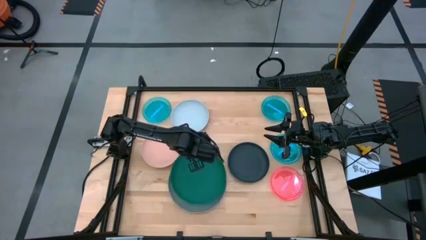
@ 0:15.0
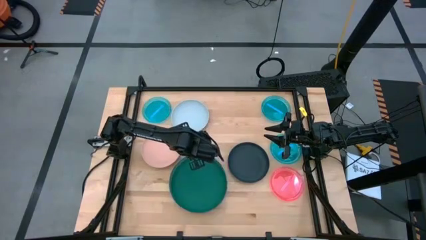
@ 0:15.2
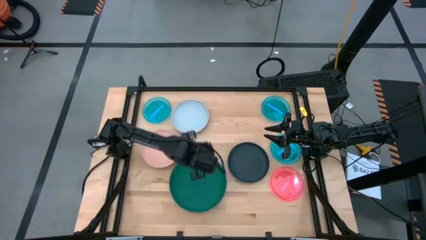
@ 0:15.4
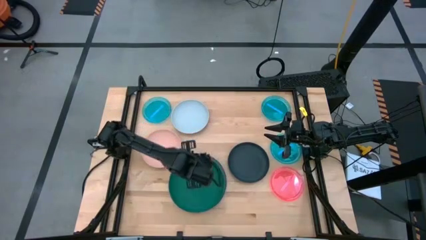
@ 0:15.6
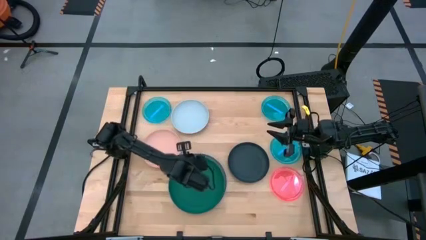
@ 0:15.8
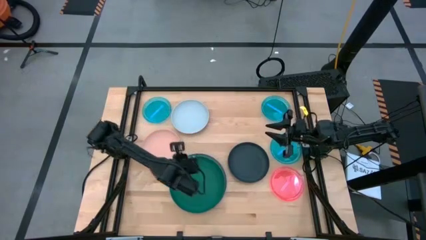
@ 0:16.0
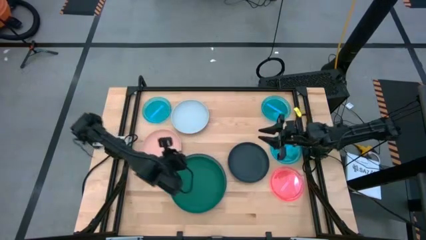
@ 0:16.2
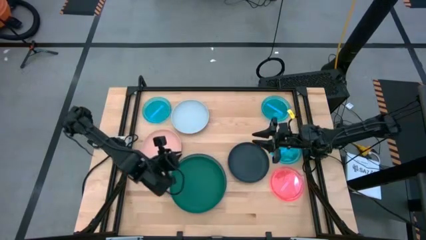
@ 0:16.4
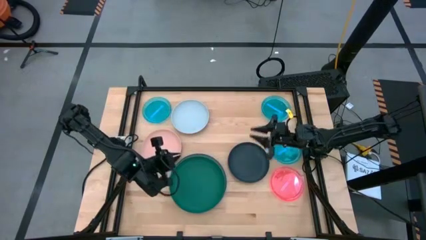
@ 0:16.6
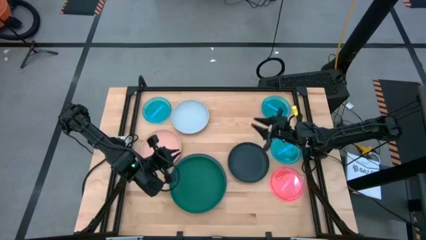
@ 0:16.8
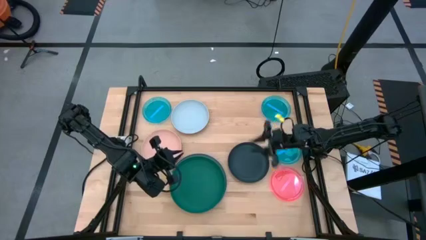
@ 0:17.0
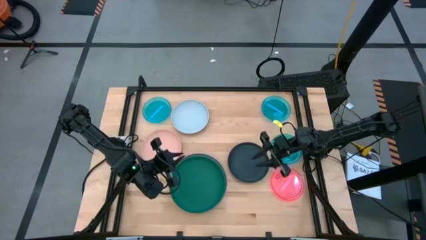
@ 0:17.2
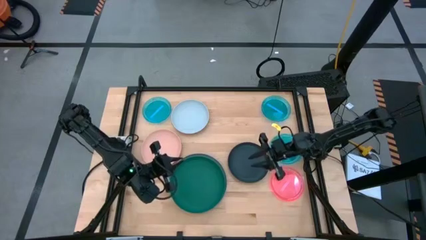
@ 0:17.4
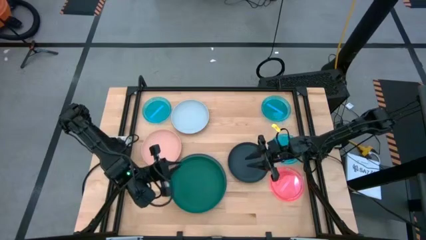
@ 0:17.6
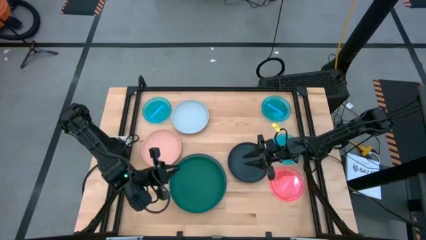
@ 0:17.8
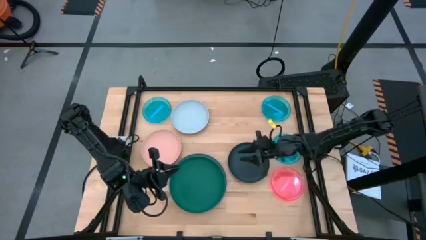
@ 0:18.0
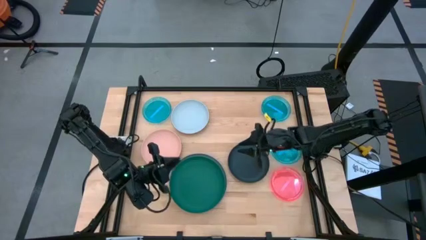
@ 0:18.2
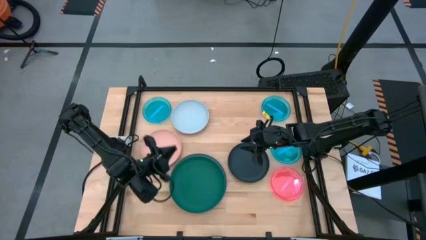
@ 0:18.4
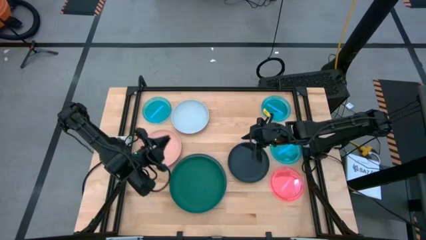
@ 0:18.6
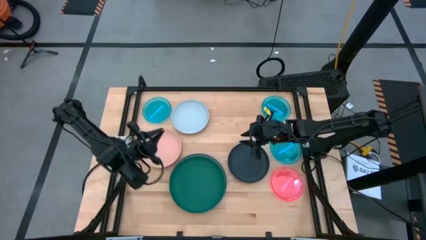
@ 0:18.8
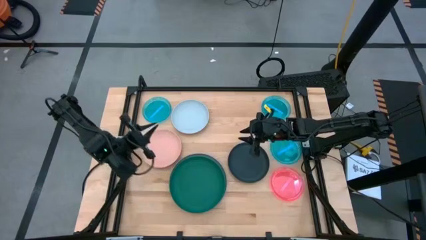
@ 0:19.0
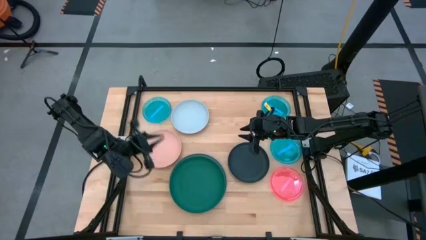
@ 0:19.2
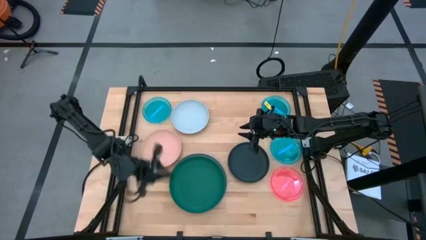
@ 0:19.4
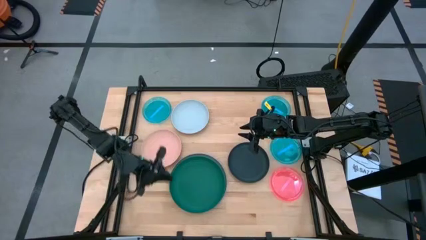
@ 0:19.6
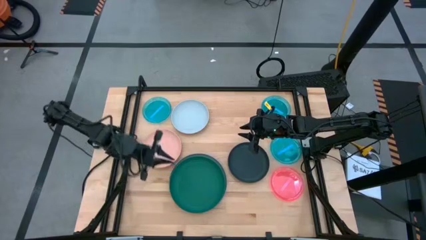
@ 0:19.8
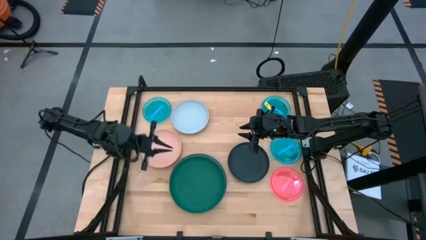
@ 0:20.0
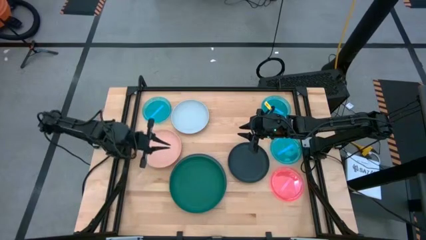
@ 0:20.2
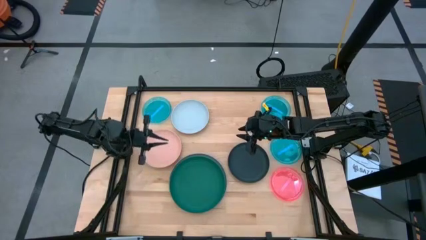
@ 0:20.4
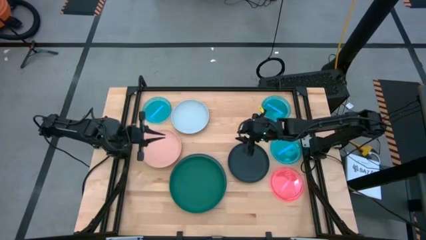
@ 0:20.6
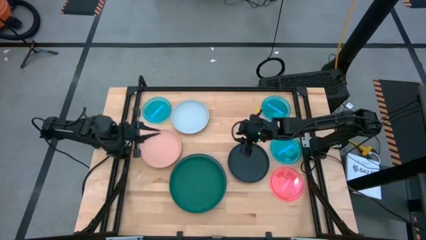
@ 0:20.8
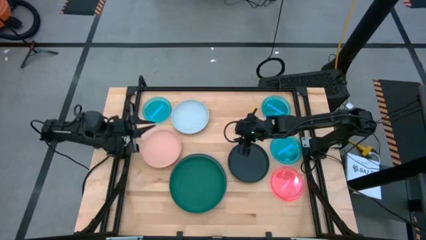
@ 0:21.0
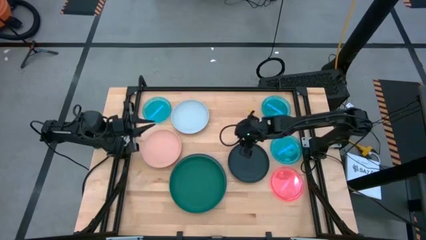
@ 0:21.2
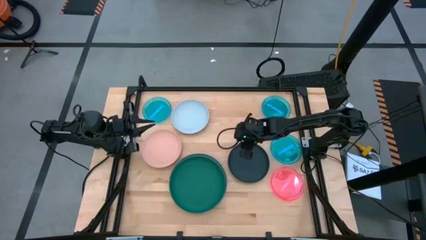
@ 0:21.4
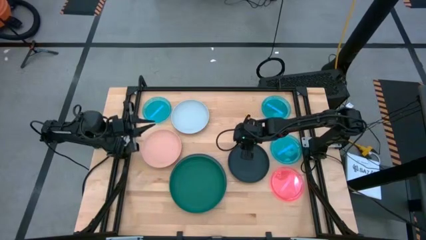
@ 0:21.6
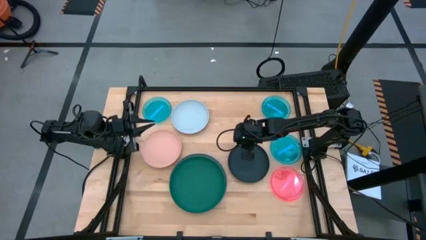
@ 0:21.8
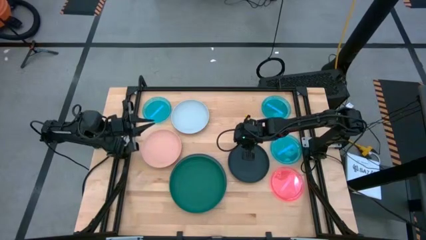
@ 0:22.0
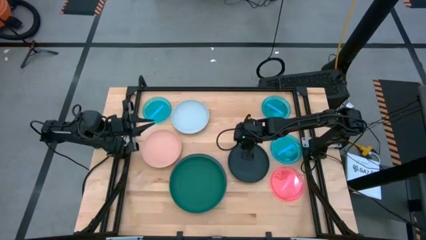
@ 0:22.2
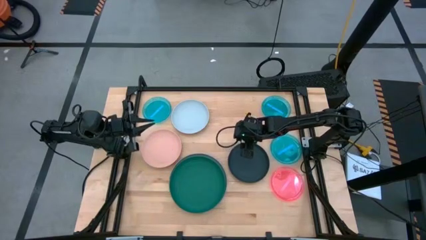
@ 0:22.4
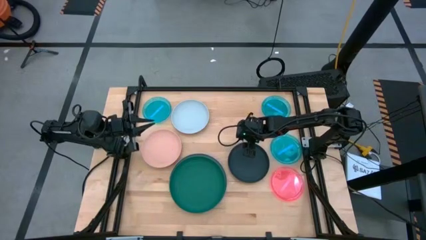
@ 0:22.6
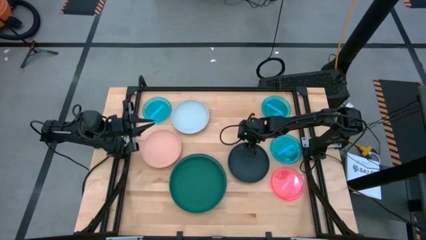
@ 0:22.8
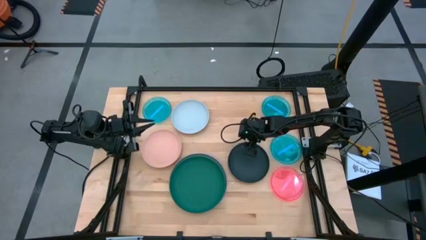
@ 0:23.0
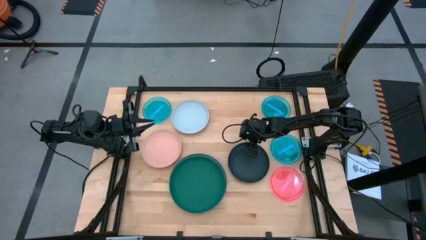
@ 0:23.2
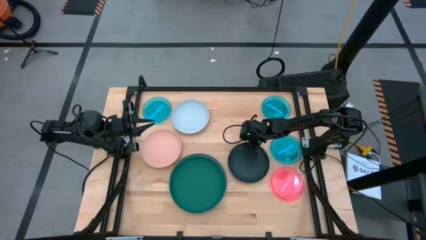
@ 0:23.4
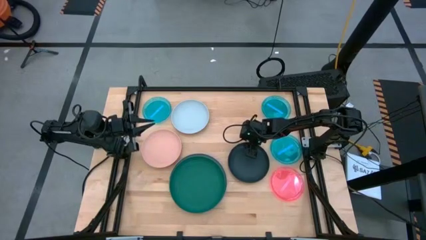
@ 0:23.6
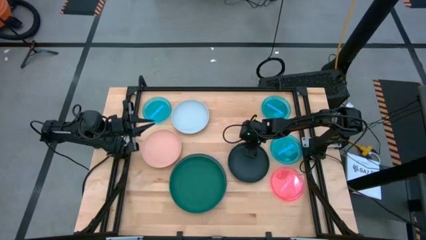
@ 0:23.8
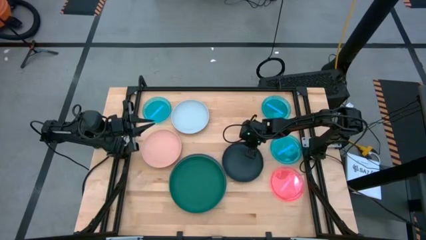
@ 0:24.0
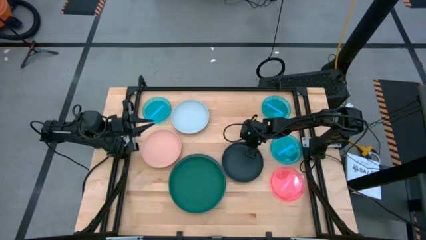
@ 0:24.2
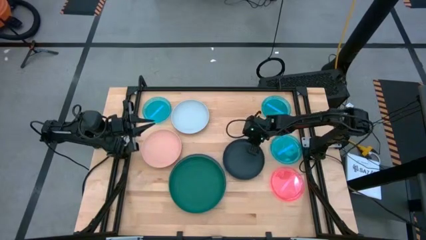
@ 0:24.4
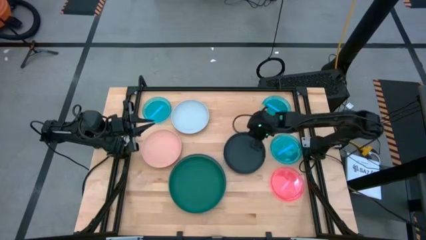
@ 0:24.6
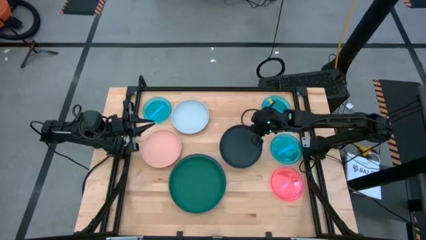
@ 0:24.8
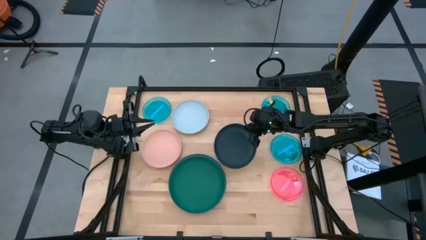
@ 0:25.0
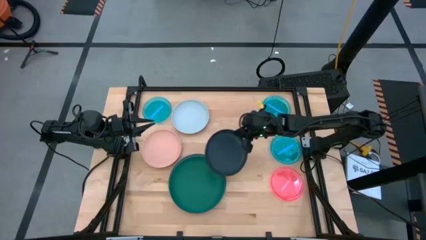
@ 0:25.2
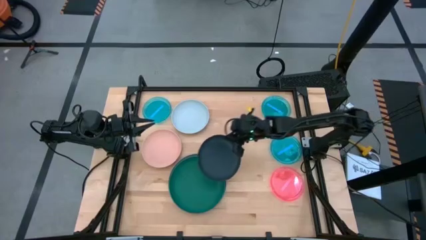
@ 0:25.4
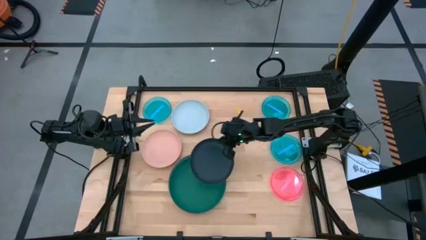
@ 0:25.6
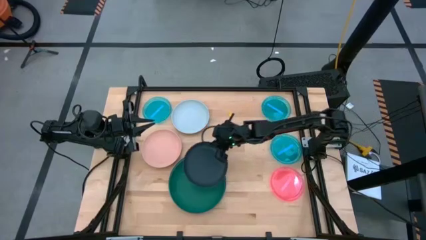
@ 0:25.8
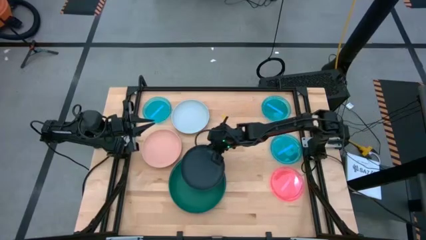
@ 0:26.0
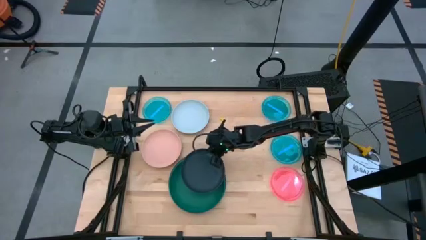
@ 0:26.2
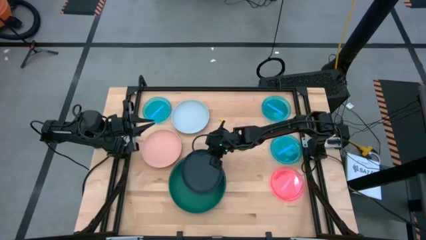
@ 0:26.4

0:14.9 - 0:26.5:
Task: Stack plastic plates
Stack the black plate on top of the green plate

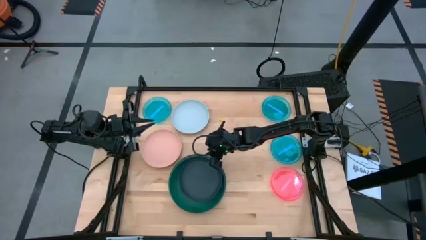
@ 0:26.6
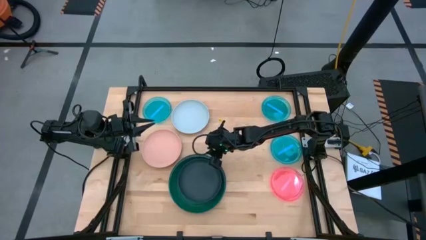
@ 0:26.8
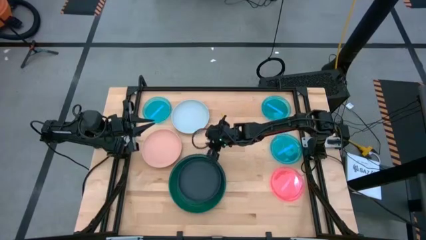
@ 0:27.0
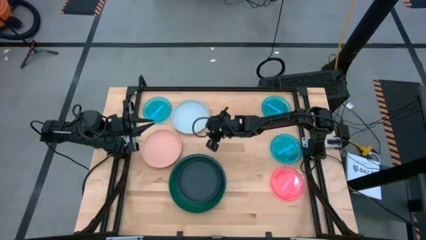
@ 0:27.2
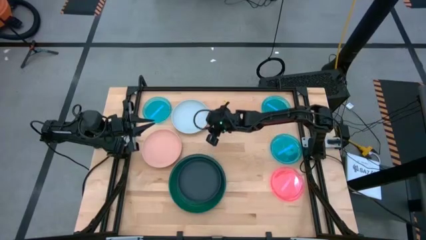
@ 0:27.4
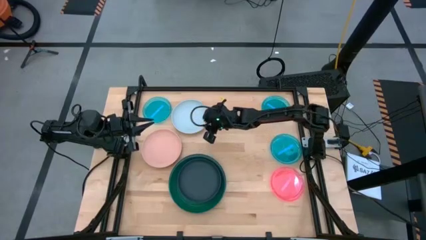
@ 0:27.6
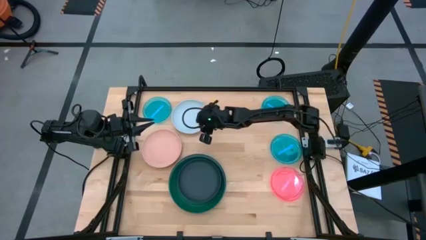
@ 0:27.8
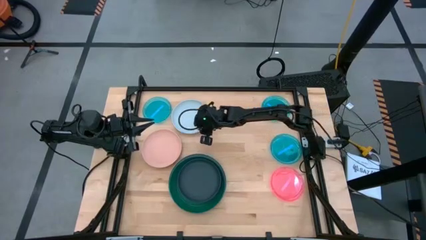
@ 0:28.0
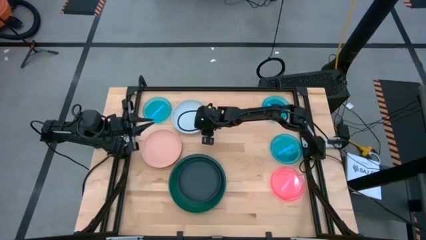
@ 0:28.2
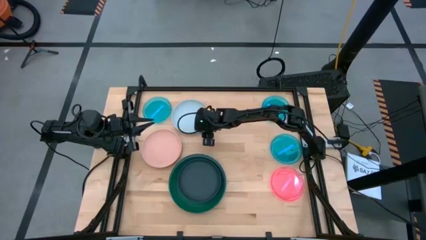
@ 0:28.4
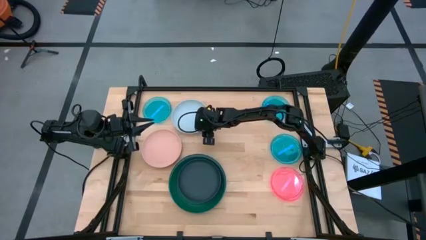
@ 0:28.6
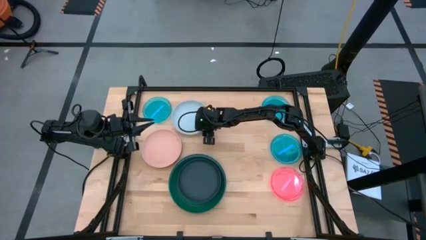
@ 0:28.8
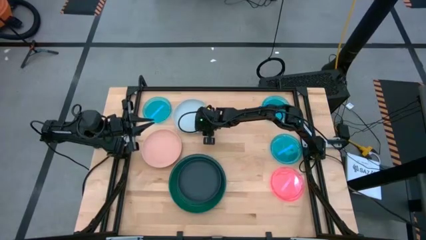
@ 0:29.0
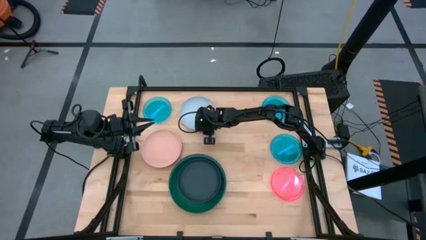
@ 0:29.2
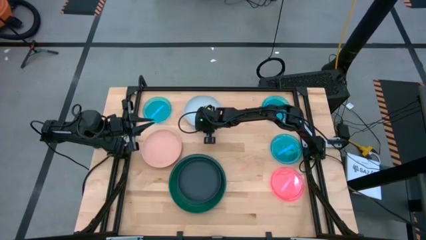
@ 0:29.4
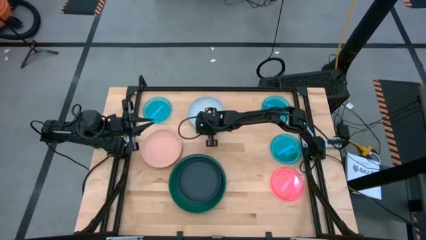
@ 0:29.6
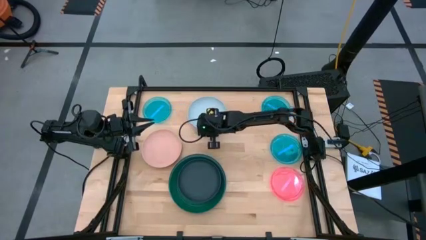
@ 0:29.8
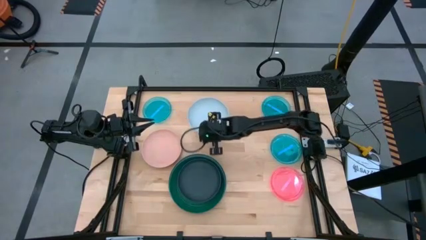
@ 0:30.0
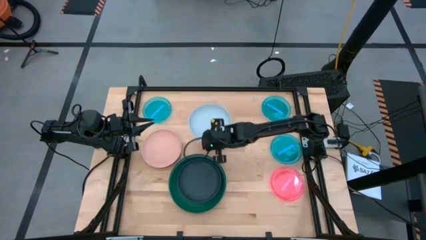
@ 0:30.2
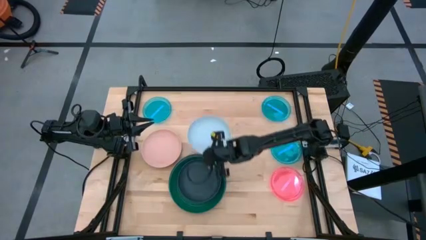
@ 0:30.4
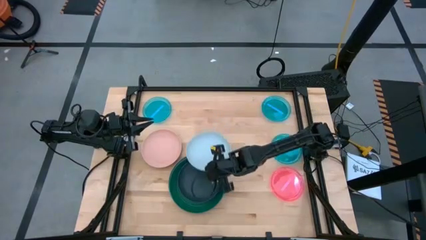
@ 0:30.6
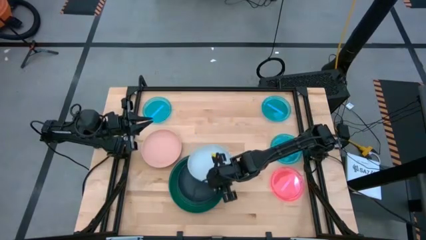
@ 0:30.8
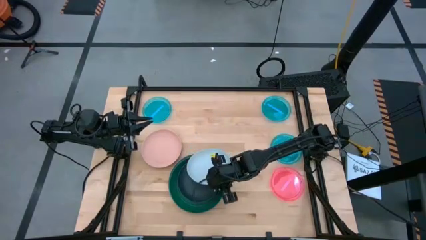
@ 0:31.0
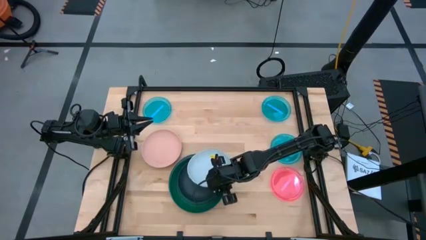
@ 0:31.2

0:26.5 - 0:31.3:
Stack the light blue plate on top of the black plate
